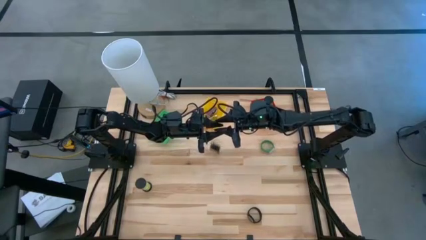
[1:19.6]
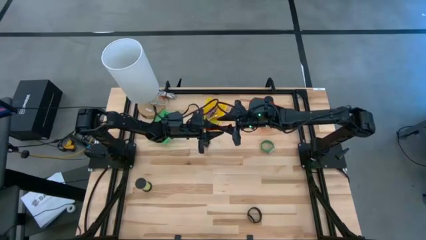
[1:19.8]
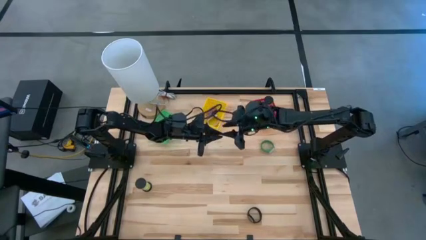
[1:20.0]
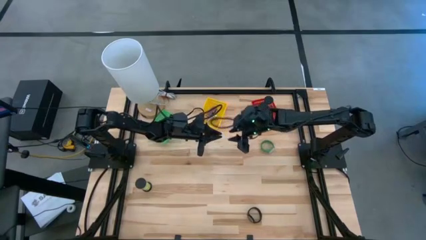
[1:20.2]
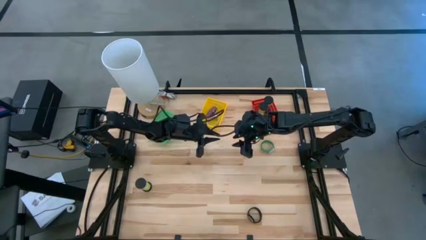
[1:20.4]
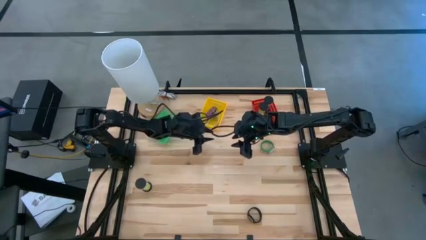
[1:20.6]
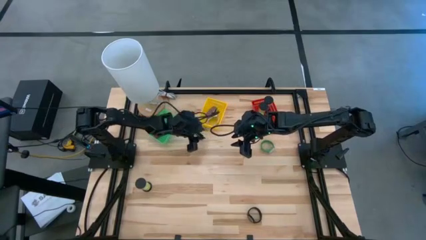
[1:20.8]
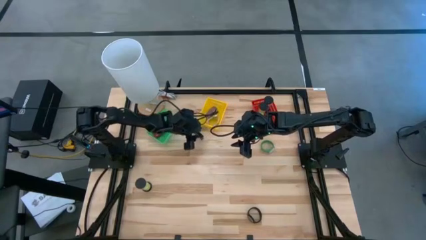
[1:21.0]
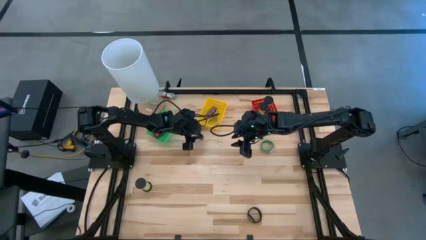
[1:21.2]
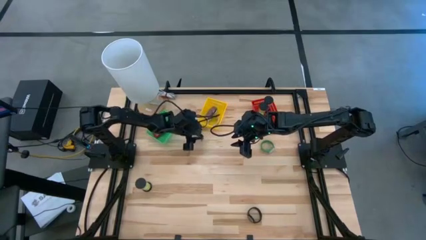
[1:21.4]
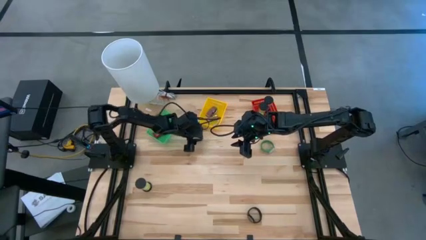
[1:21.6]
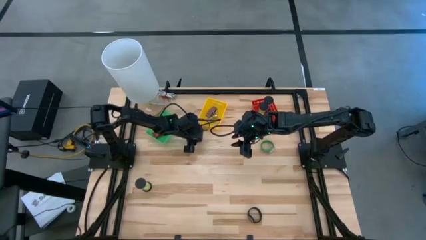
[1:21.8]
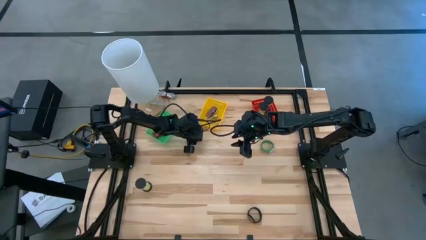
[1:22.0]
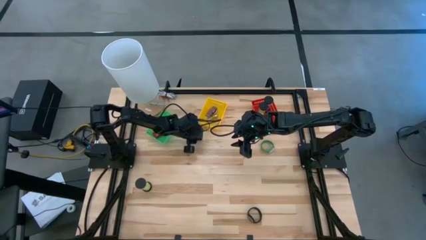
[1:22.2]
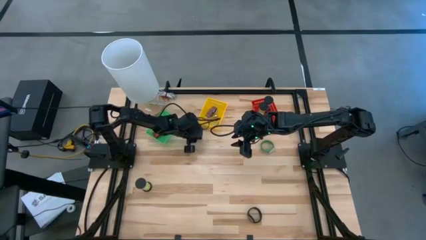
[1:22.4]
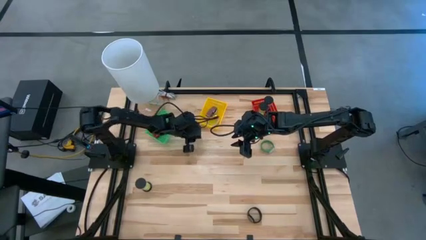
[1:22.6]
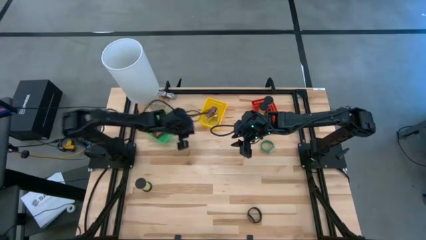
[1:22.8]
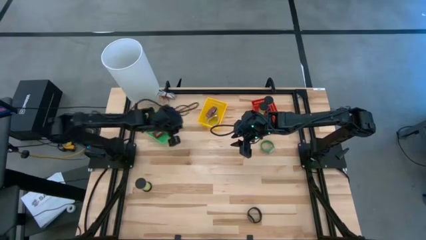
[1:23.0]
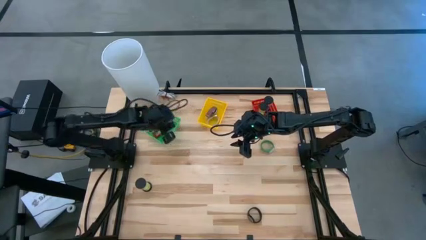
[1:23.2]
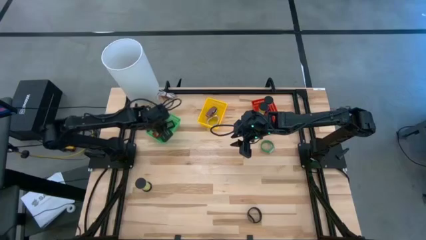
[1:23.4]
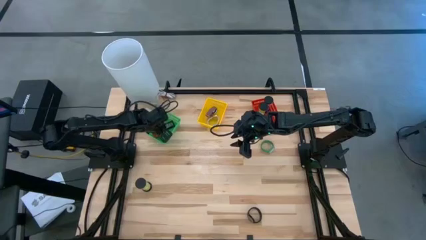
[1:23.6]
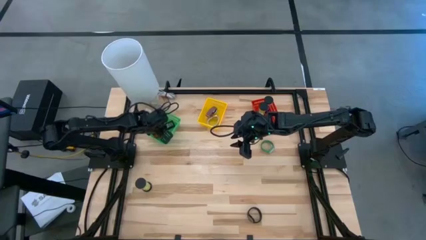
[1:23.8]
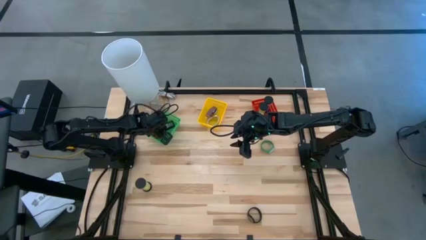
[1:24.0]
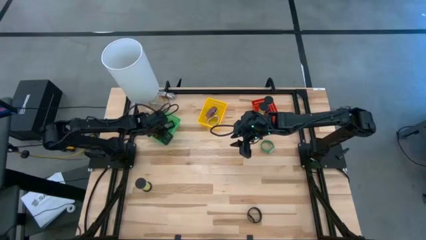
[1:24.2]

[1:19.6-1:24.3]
Task: Pick & Place Office items
Put the black timer into the green bin

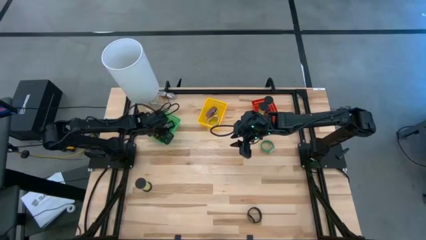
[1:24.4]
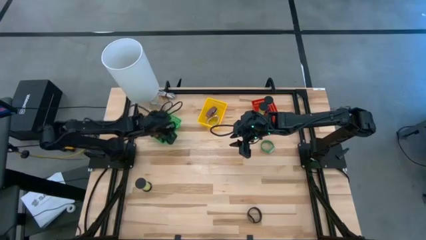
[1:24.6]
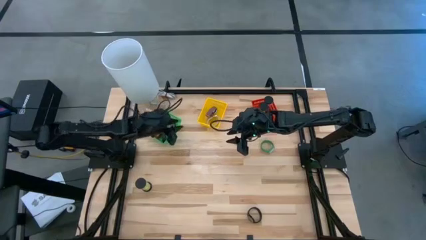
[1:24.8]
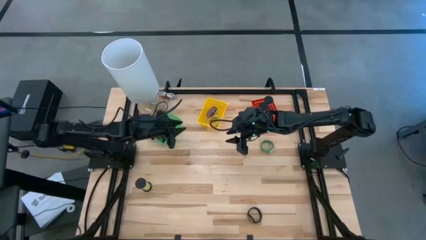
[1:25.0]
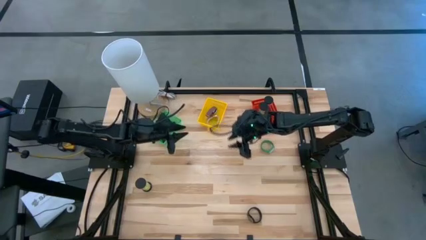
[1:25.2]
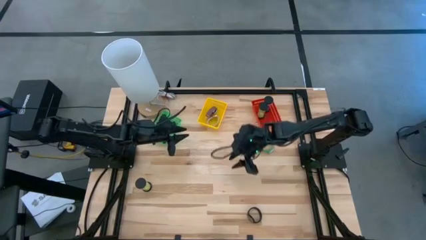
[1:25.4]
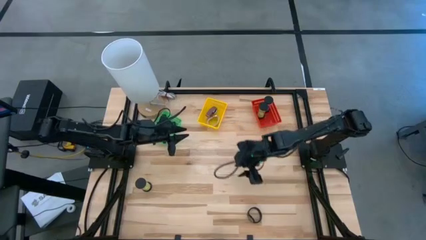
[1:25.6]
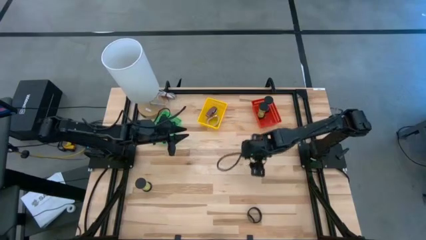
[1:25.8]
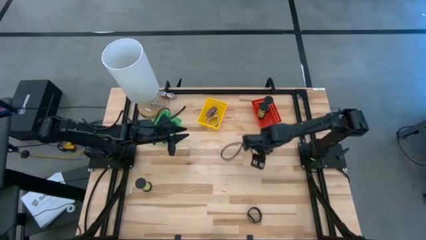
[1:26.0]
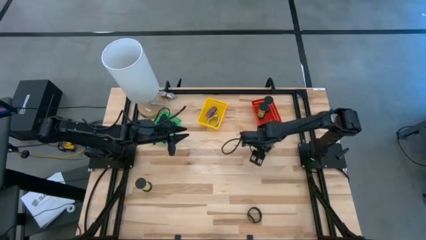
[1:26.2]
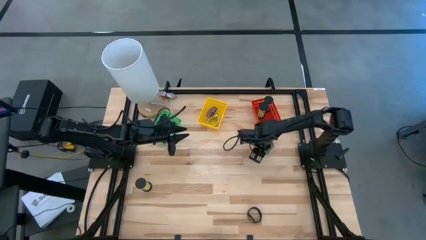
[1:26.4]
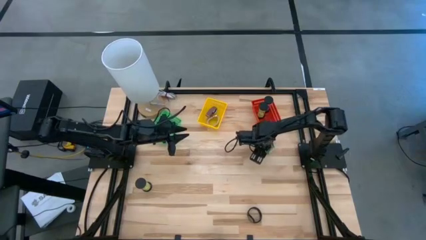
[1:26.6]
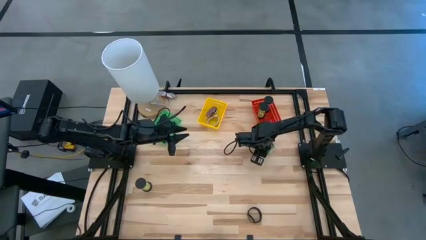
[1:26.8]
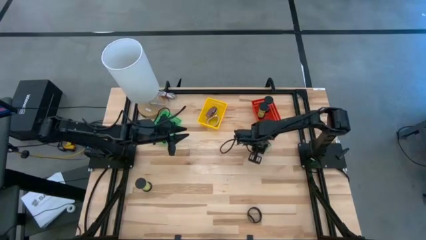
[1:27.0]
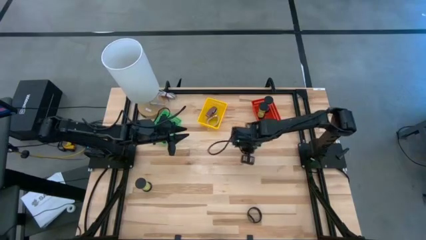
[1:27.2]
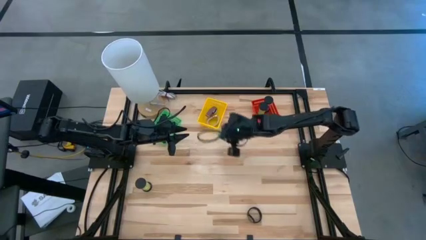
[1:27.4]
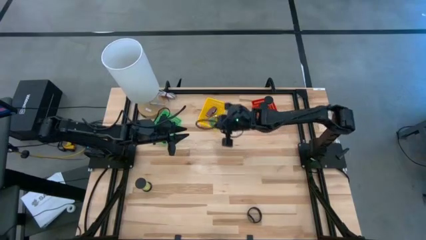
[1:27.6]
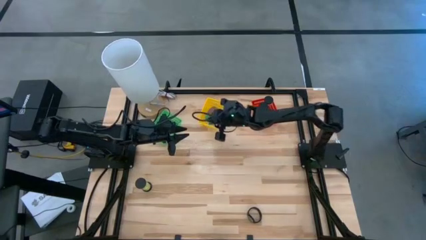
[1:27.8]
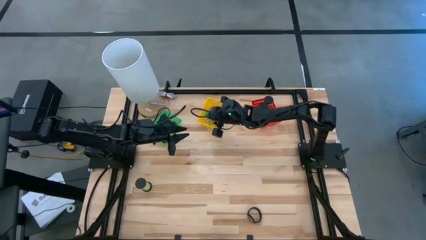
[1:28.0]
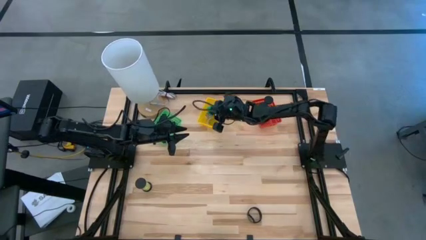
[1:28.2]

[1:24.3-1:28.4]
Put the green watch into the yellow bin

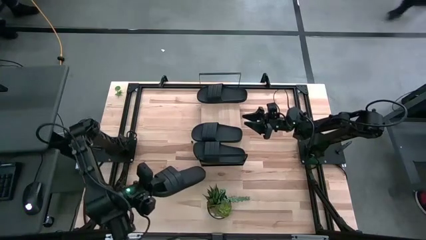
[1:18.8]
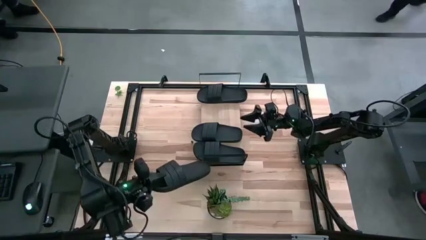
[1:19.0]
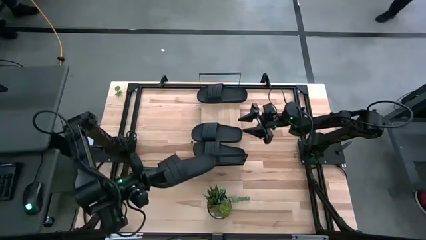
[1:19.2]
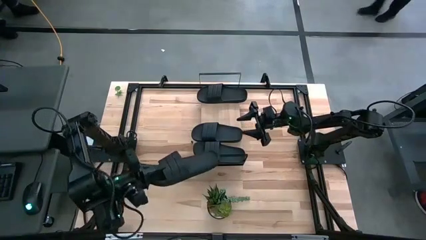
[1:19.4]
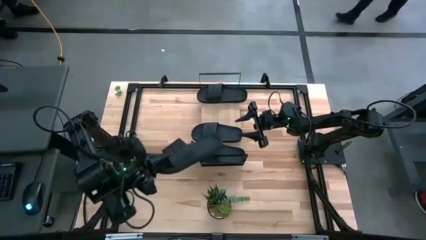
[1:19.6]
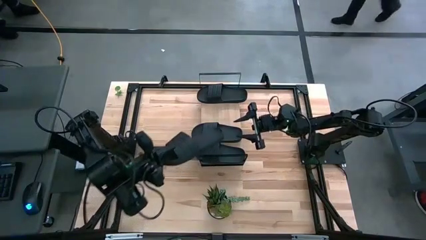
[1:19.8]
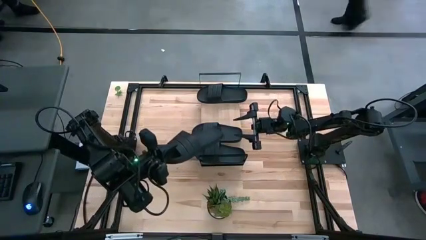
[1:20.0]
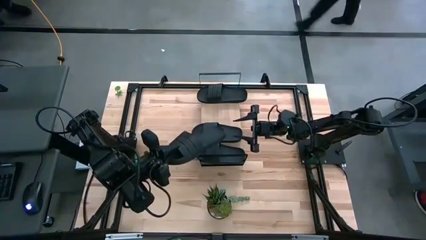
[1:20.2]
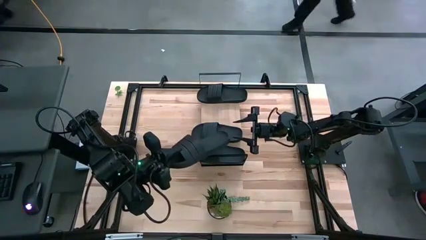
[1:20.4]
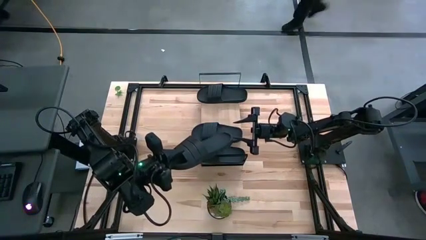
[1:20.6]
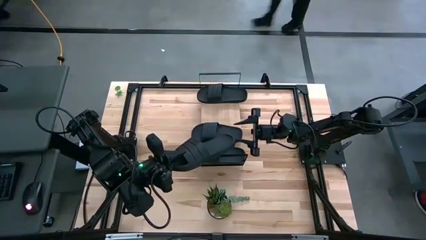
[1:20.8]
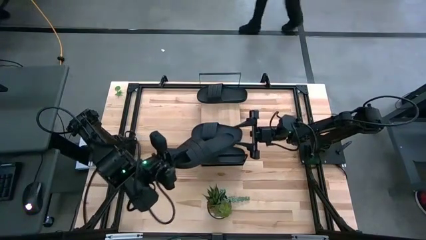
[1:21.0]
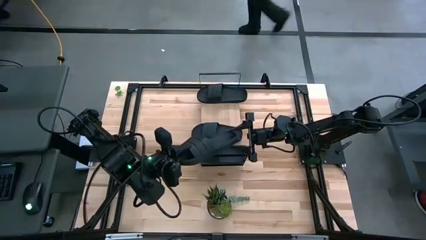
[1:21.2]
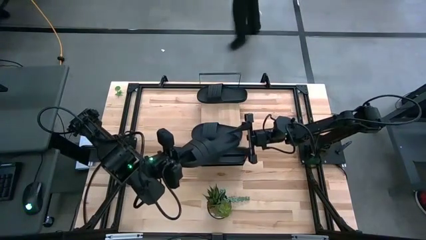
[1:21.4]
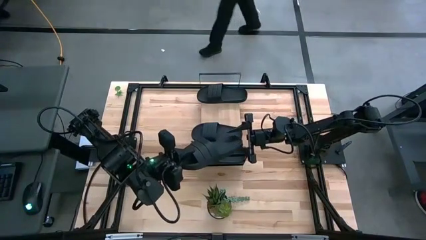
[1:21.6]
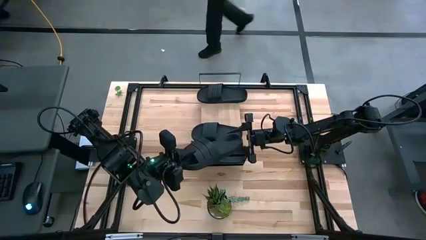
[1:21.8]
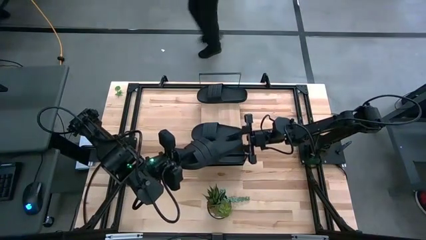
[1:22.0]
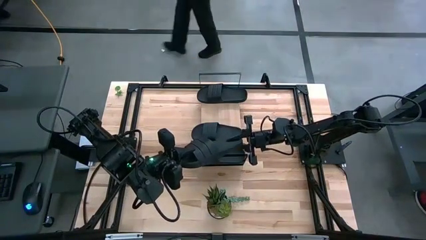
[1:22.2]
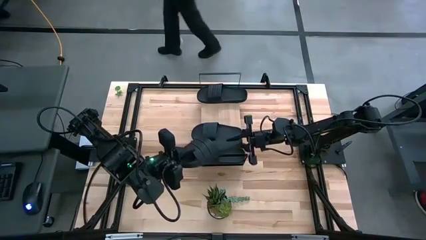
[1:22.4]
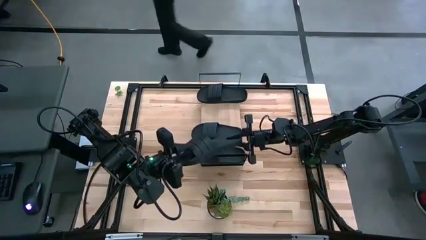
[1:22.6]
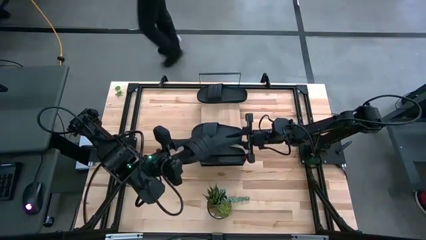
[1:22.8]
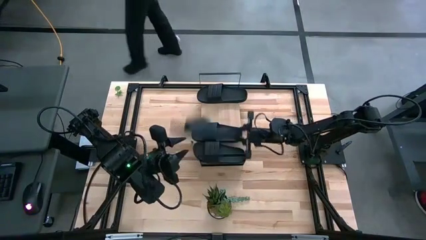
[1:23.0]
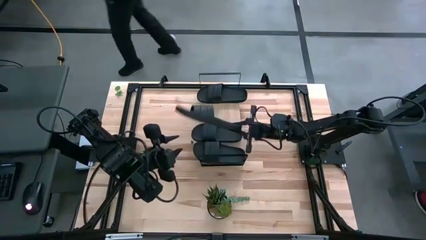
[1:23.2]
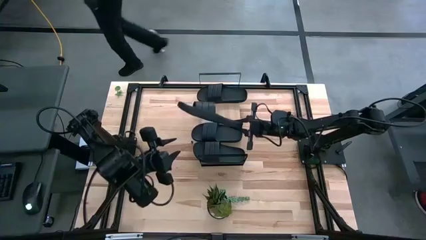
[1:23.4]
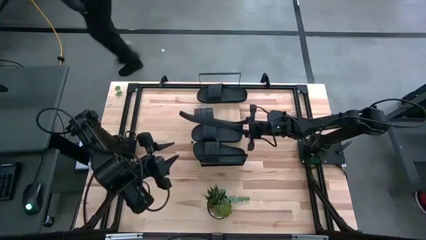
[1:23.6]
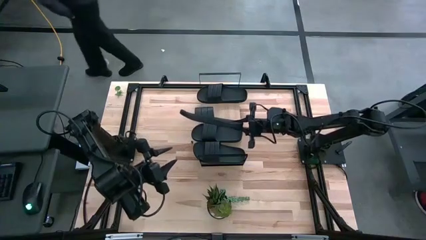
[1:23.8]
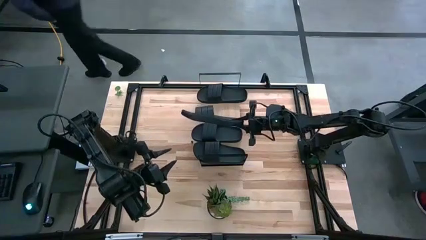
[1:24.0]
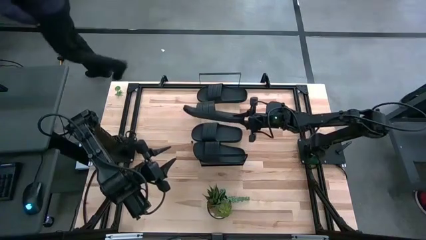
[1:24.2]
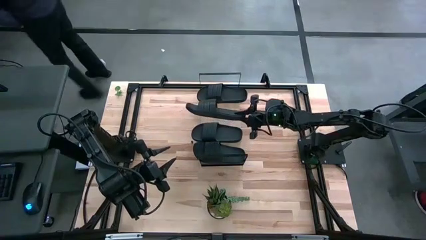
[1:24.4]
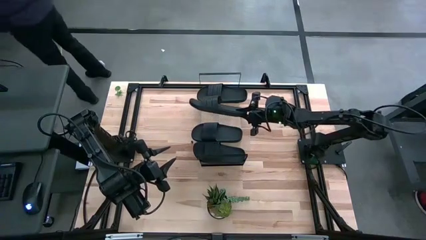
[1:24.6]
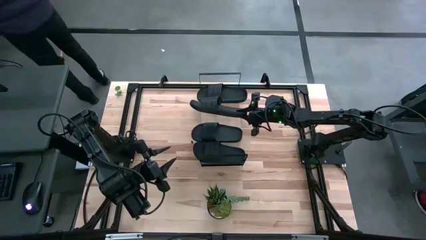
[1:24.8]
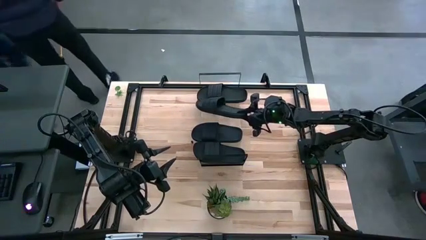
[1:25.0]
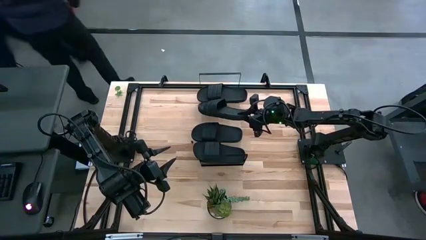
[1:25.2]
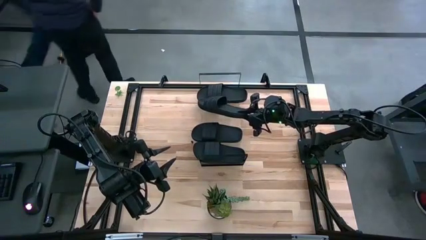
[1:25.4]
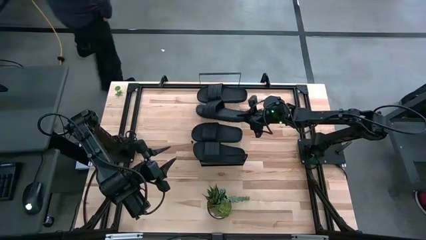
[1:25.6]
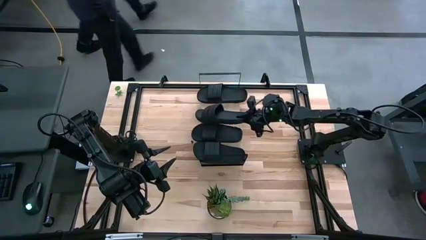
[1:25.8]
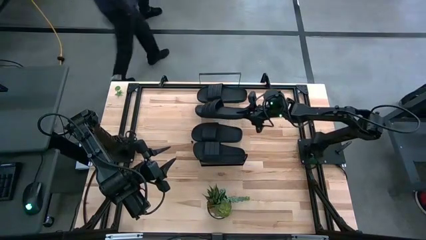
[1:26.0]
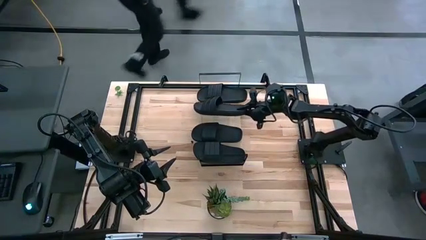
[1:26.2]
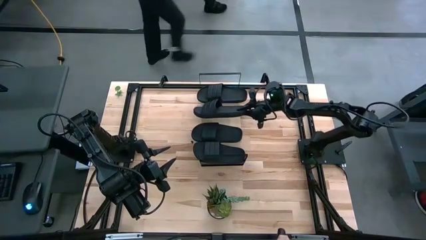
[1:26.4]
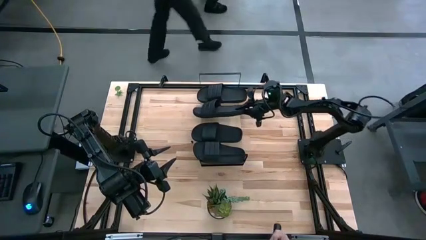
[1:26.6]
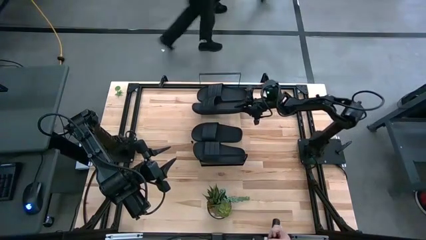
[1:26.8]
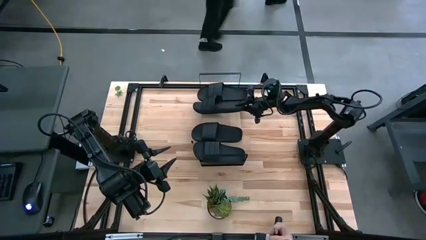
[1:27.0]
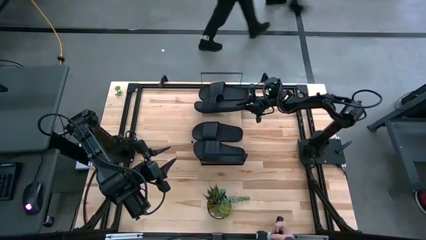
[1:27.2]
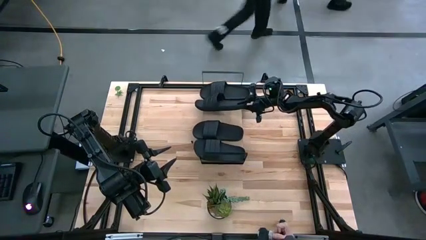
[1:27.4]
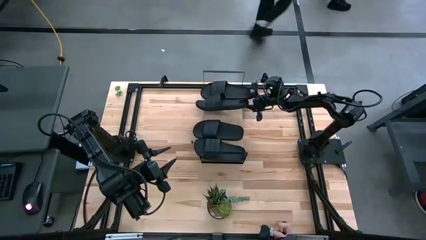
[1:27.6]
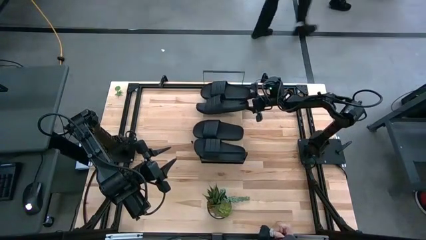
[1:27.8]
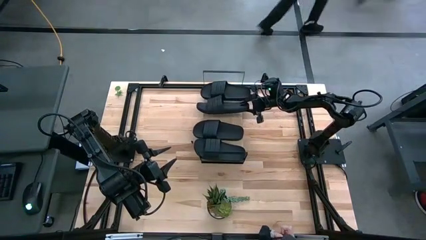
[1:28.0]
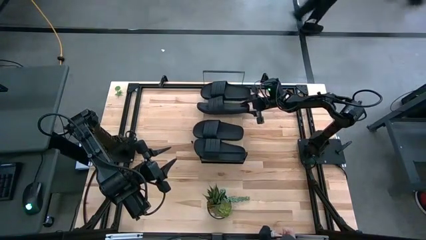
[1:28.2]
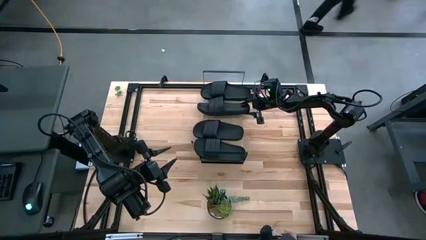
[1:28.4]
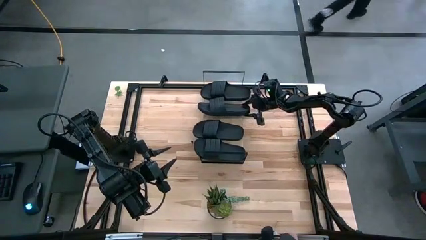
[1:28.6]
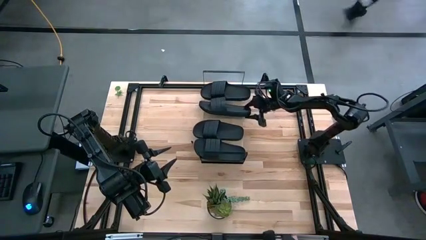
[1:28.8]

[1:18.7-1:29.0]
Task: Pick and place slides into the shelf
Put the black slide on the shelf
